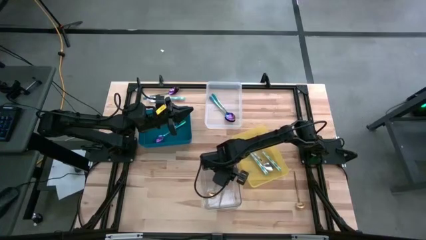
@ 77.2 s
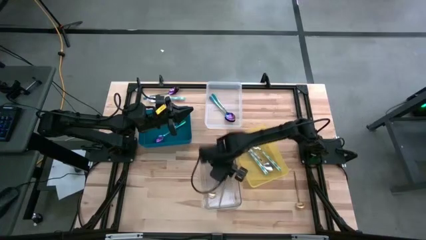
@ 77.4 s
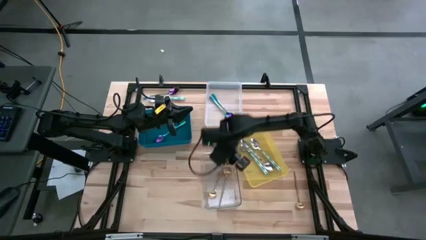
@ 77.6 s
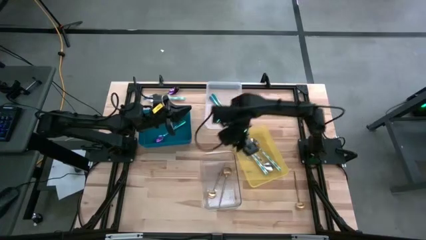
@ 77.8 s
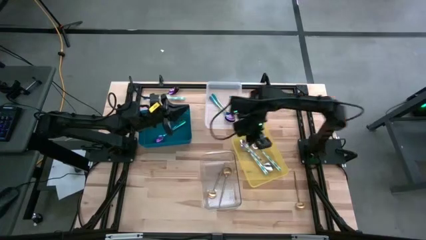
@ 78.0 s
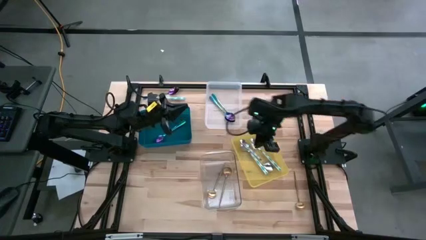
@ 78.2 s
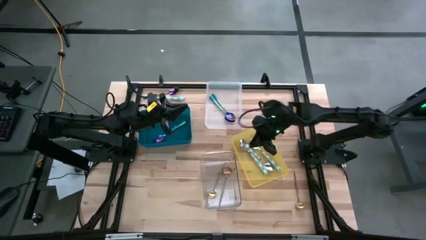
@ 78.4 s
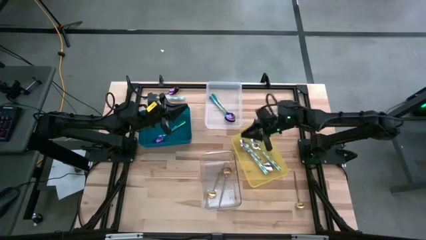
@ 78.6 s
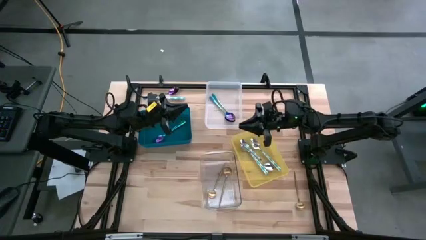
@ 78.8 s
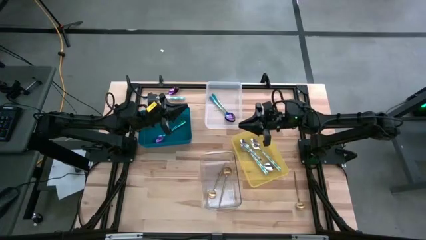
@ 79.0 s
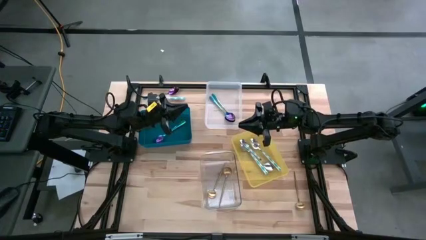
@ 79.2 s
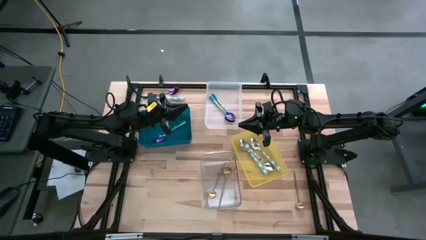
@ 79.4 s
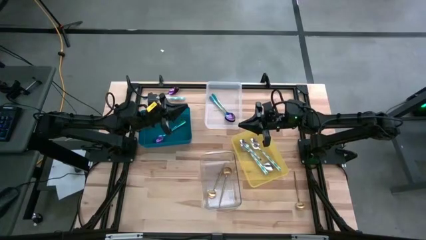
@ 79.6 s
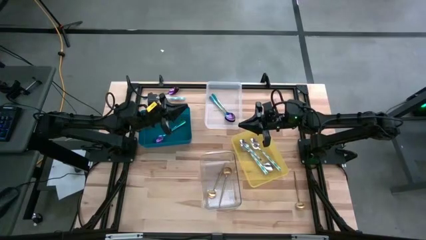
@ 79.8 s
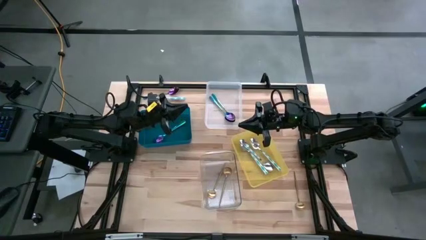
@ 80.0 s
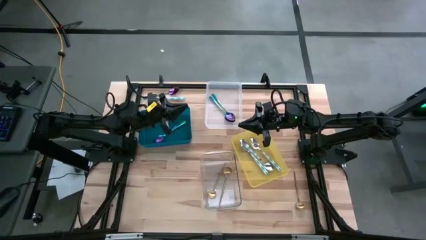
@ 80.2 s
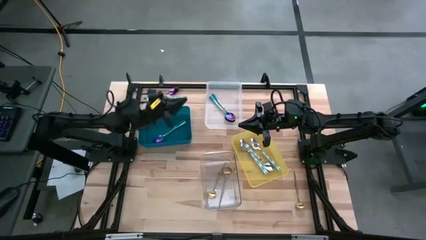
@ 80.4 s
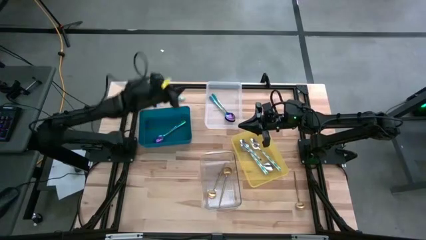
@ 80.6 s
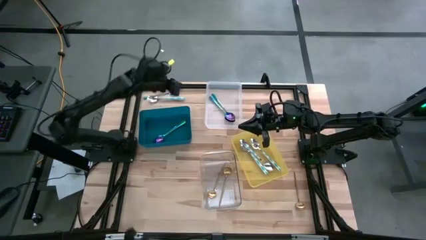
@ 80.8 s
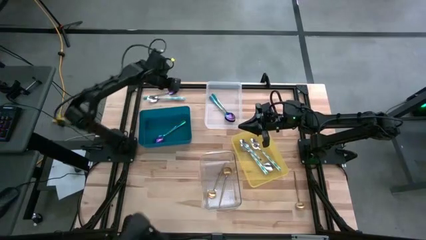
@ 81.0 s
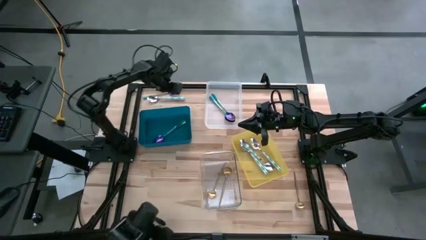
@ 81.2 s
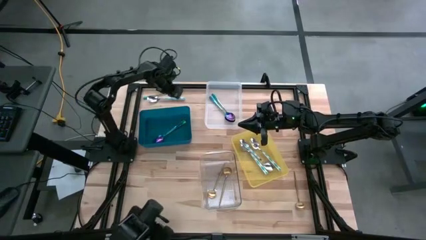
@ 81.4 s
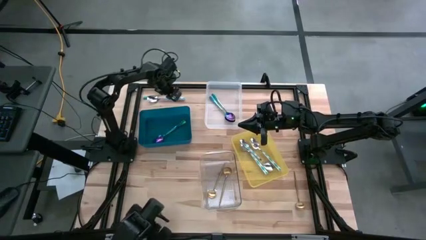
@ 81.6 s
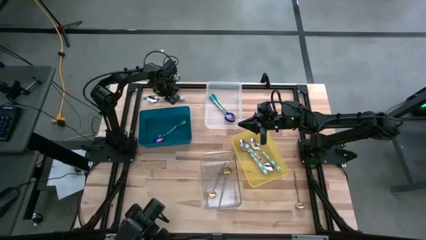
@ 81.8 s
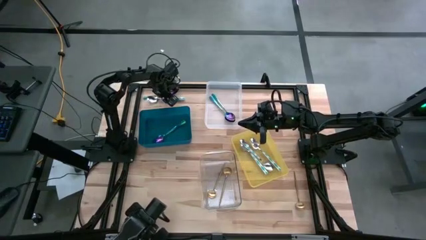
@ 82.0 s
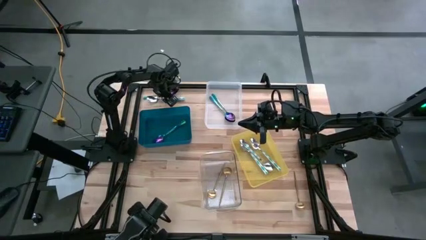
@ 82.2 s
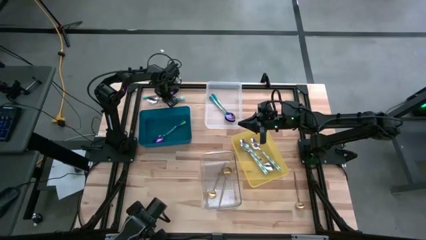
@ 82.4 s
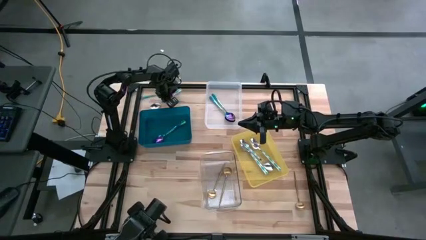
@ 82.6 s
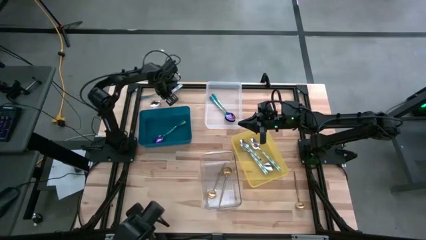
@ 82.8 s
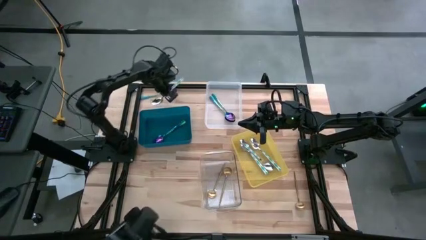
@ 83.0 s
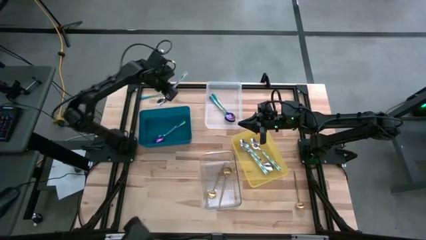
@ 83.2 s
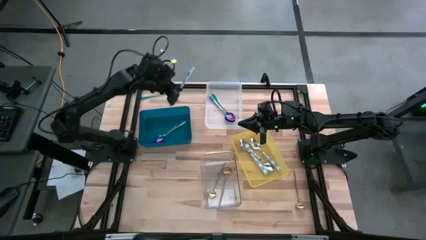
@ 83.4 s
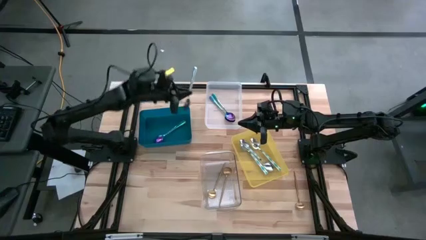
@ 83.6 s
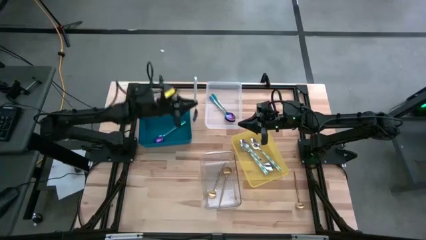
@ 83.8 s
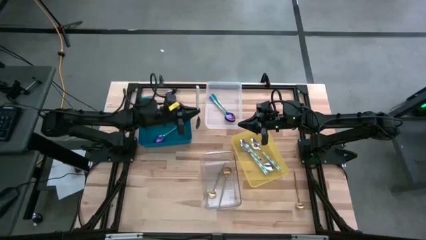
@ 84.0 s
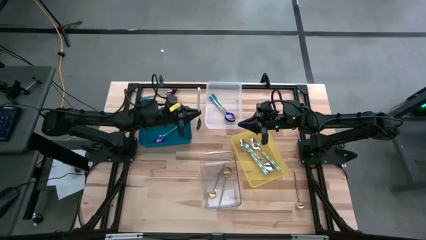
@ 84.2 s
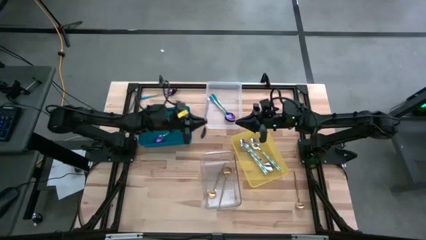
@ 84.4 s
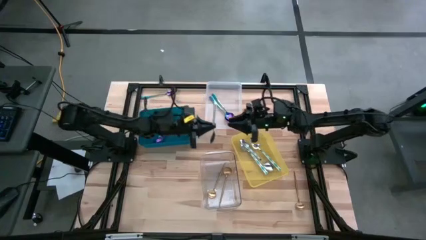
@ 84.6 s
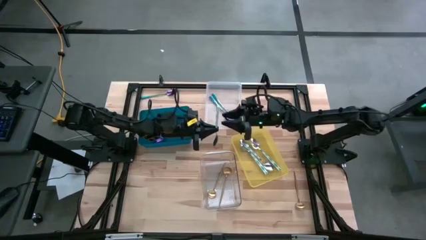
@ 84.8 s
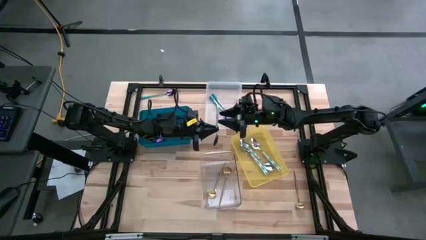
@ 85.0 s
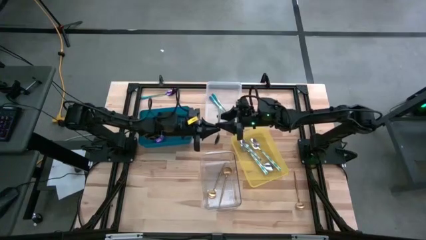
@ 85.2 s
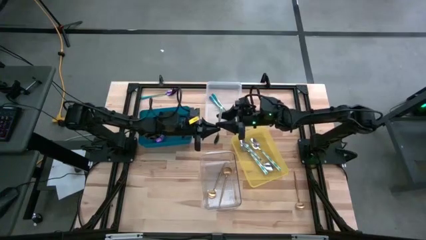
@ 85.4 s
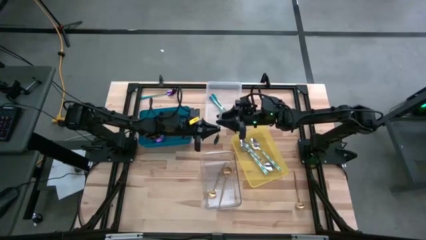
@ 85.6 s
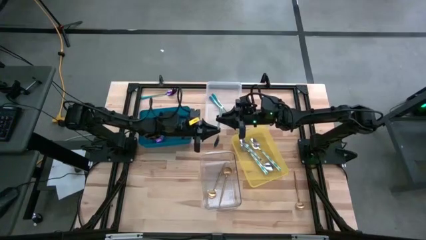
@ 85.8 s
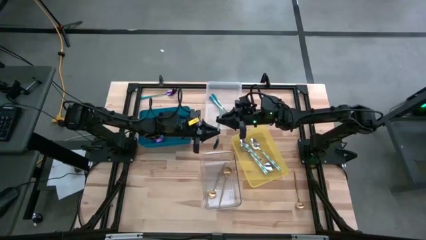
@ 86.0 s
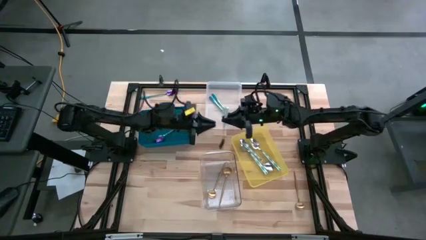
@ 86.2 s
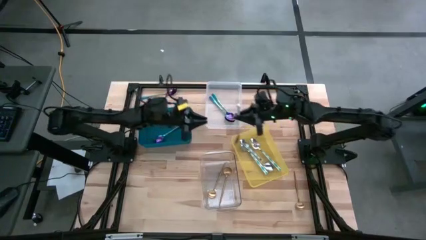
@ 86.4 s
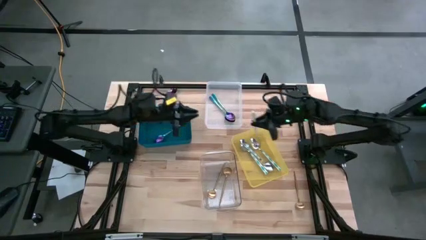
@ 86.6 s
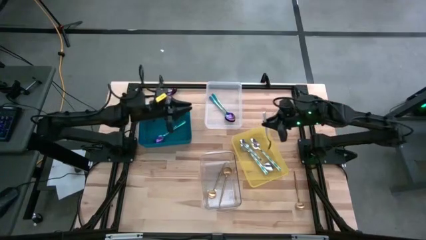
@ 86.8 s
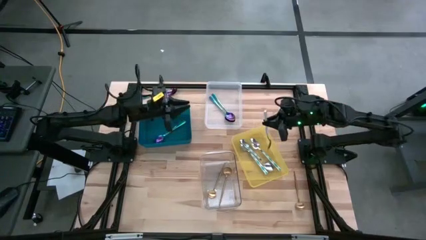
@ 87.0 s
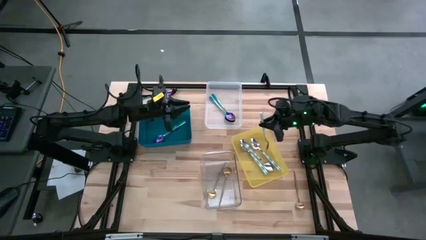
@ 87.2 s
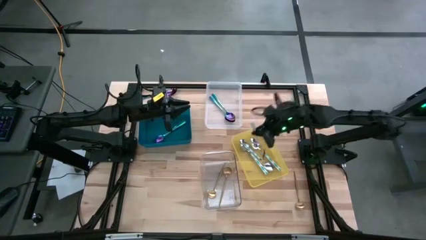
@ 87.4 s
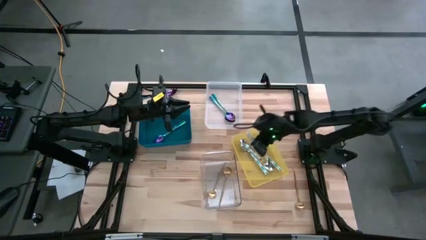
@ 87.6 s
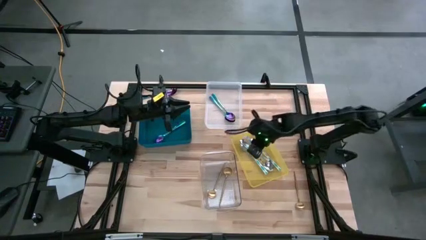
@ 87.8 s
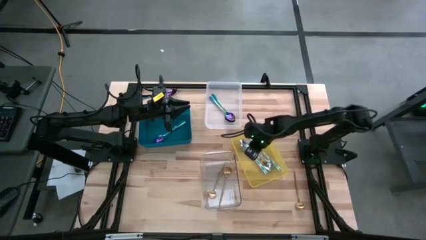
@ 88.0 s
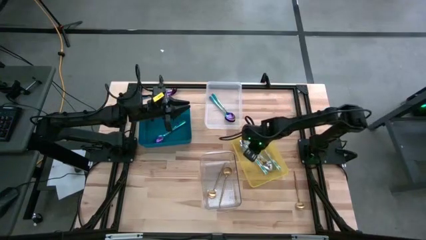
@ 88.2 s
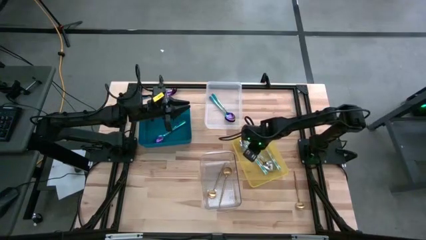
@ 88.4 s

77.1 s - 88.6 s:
Task: Sort silverware by color (type)
Put the white spoon into the yellow bin

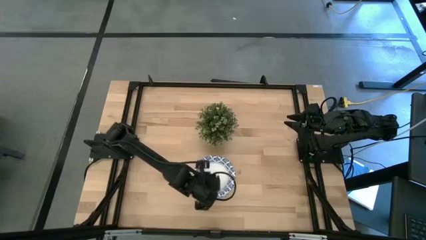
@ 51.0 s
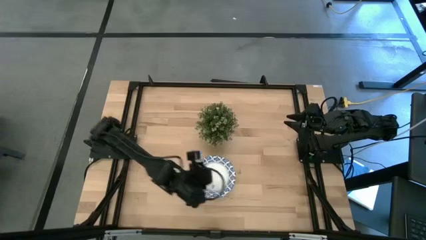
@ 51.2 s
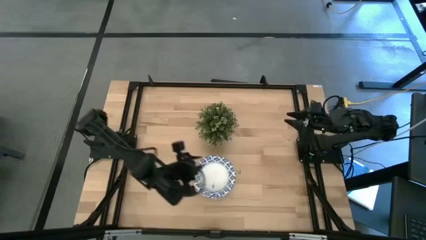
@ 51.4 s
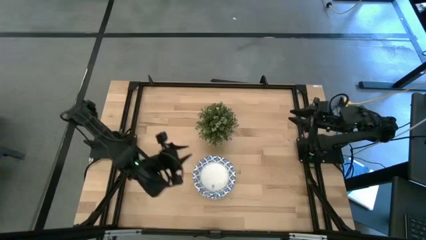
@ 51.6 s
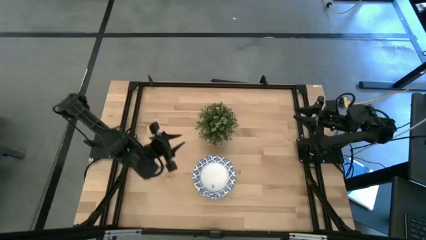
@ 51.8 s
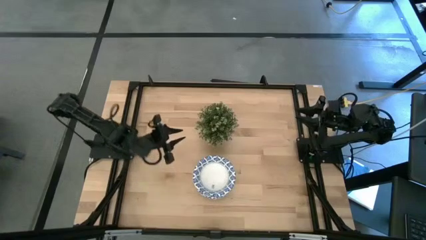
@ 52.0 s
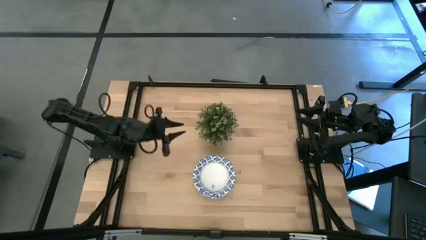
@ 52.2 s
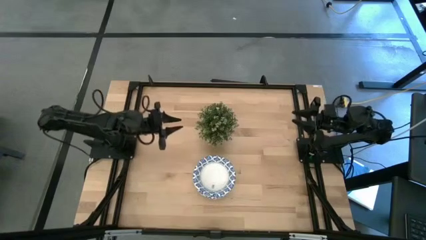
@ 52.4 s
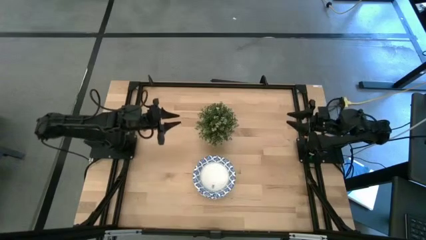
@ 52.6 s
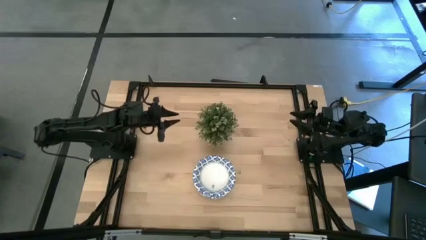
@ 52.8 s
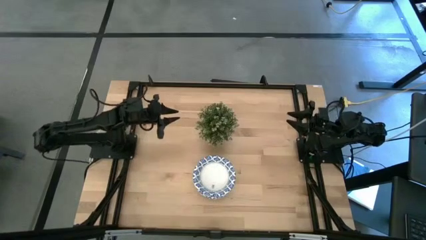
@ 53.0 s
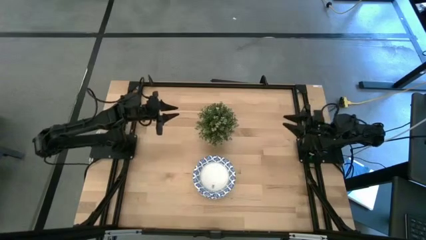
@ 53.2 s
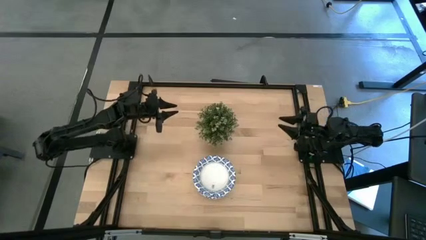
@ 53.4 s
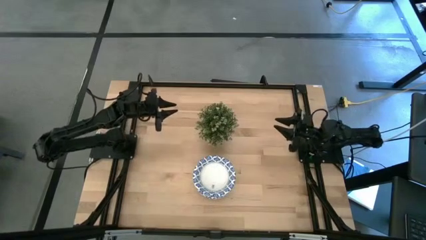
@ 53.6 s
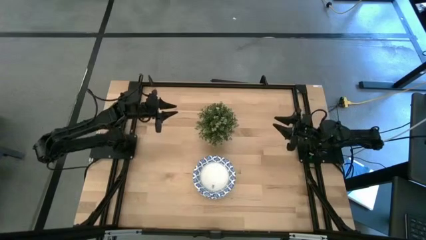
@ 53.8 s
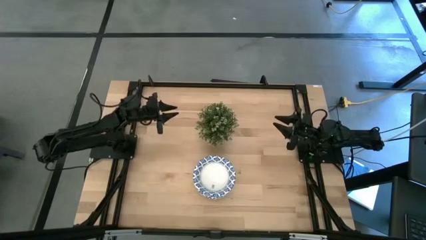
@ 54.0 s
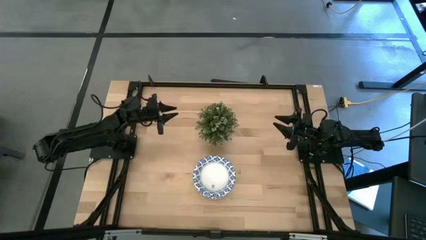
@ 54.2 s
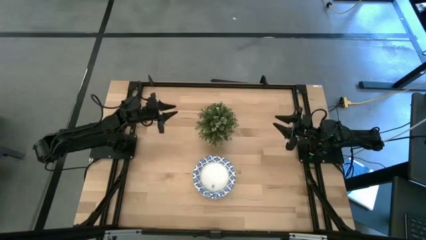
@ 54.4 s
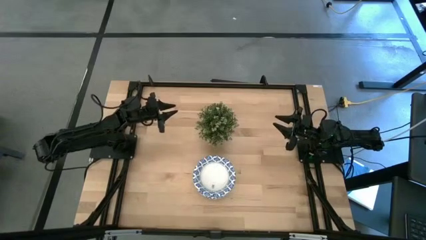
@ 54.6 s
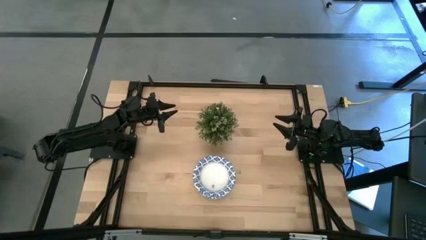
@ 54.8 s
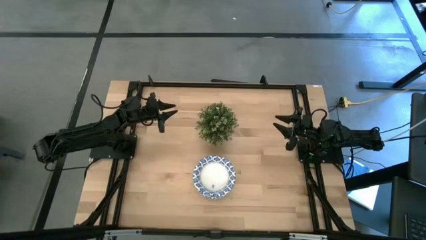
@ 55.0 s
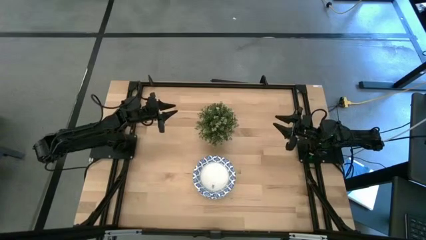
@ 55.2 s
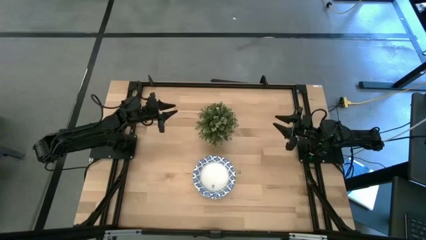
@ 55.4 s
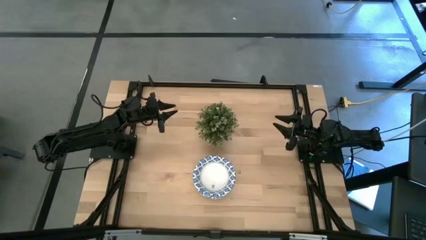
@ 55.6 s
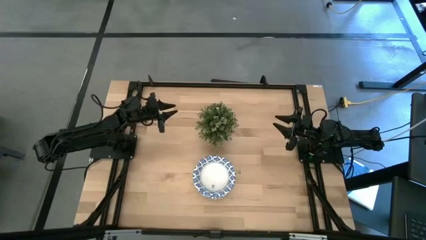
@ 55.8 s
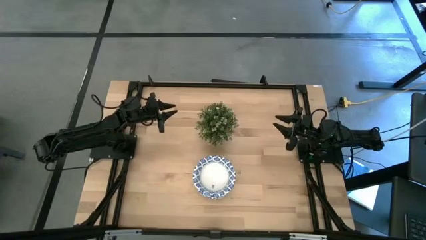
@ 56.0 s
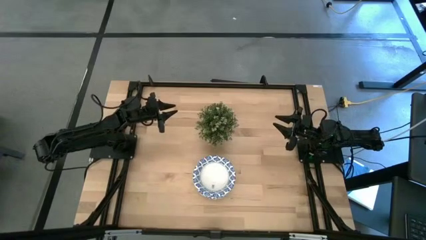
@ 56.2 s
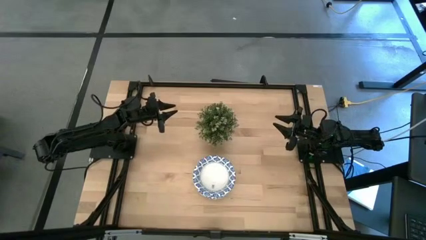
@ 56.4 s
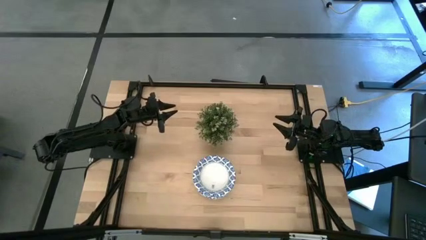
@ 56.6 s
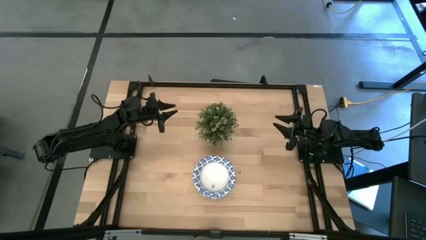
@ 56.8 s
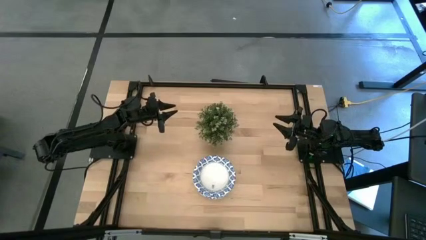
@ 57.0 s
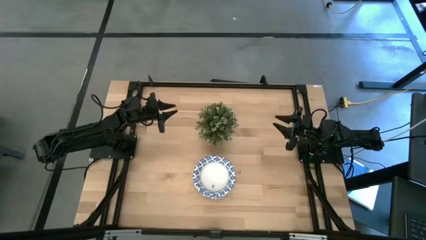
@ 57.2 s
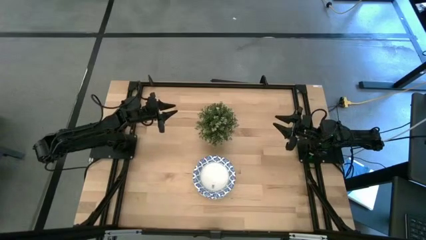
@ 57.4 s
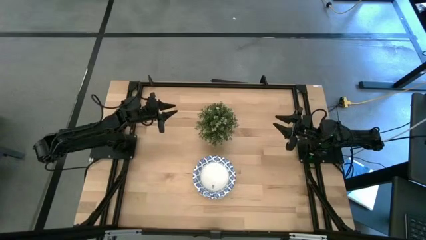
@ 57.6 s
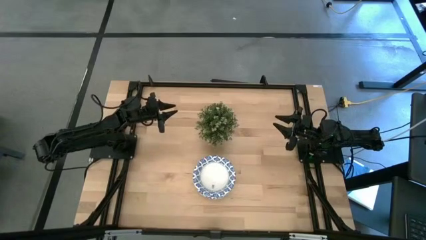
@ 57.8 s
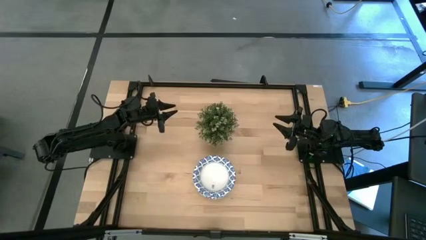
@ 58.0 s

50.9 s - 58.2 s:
Task: Nest bowls inside each other
Return to Home Position
